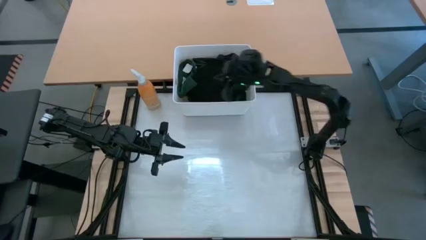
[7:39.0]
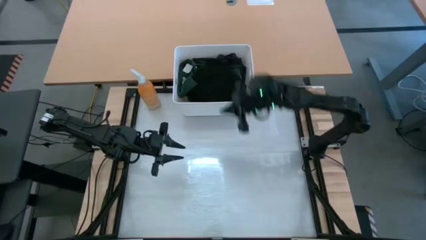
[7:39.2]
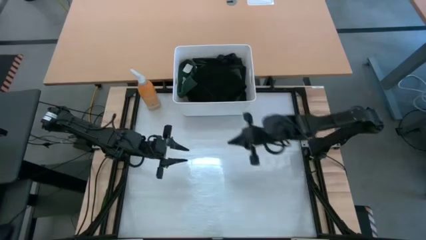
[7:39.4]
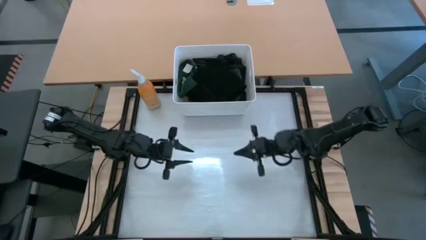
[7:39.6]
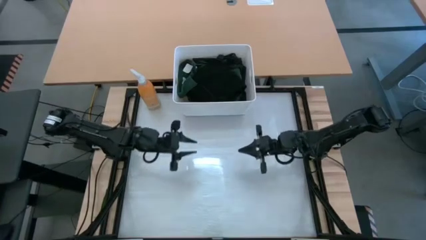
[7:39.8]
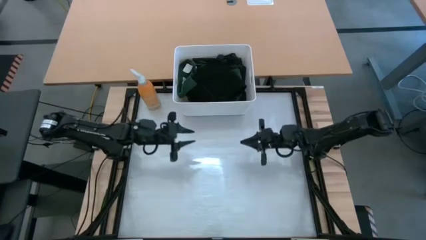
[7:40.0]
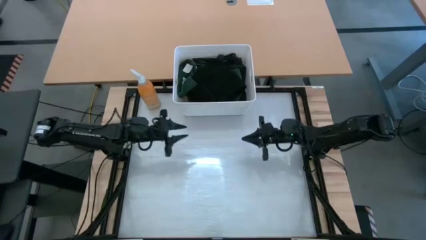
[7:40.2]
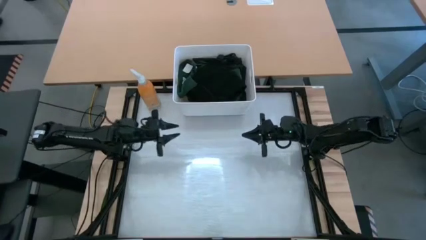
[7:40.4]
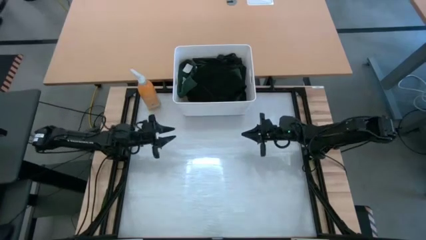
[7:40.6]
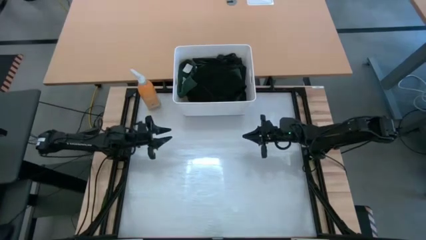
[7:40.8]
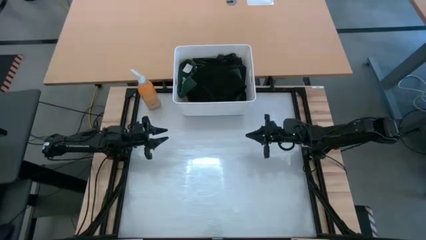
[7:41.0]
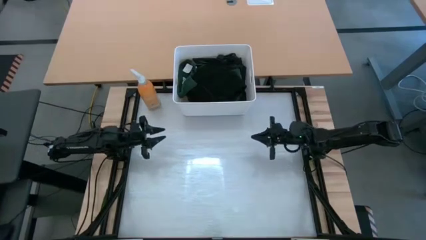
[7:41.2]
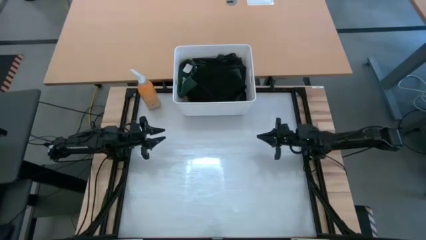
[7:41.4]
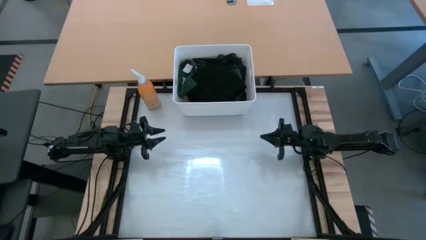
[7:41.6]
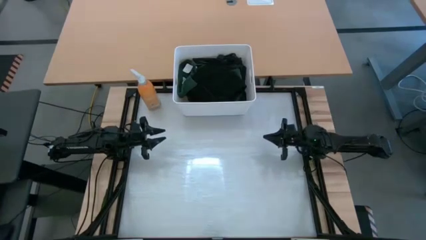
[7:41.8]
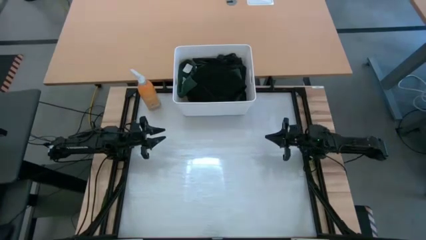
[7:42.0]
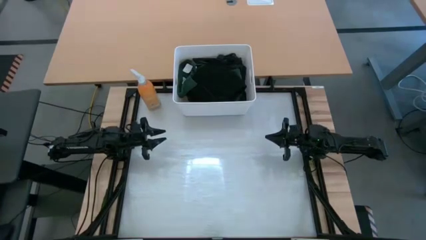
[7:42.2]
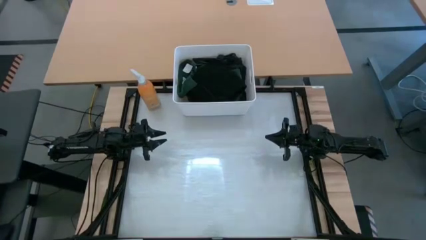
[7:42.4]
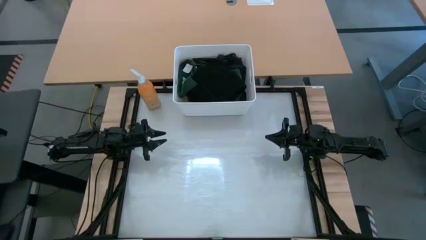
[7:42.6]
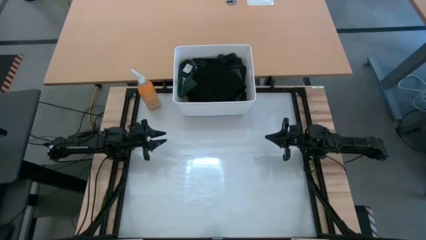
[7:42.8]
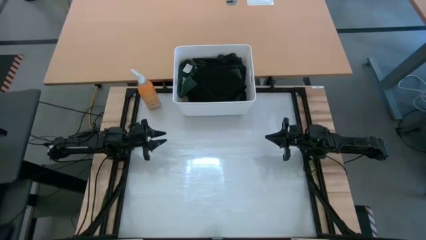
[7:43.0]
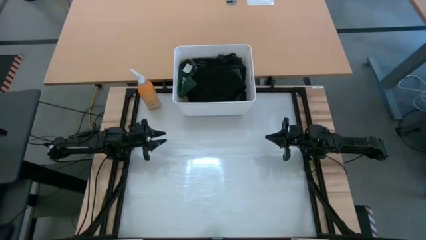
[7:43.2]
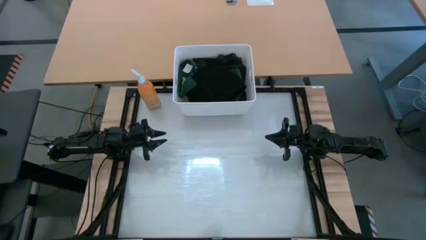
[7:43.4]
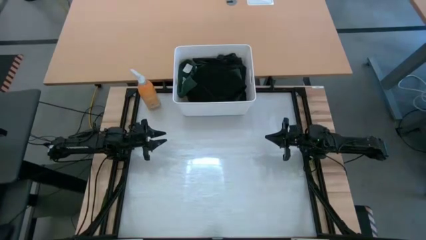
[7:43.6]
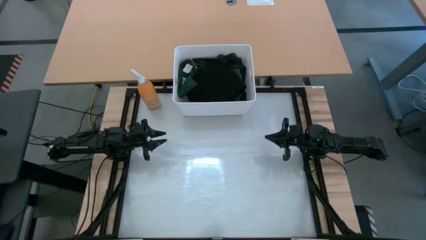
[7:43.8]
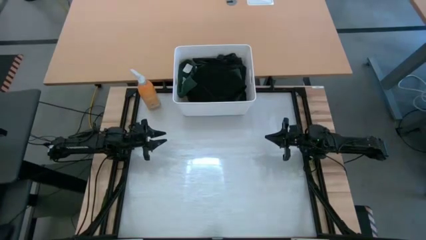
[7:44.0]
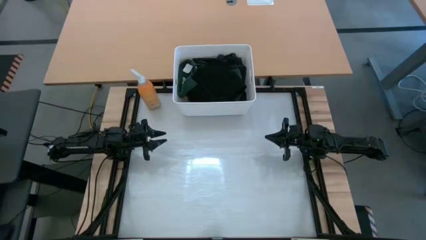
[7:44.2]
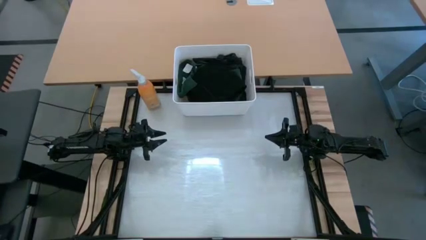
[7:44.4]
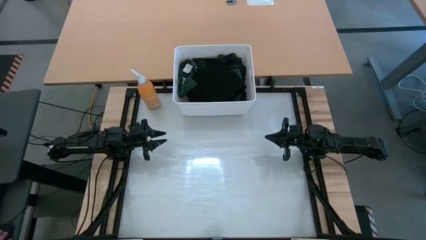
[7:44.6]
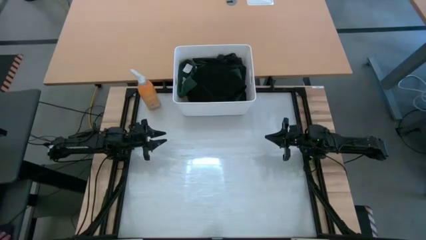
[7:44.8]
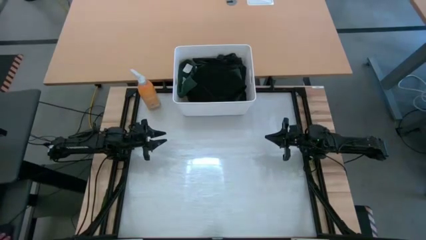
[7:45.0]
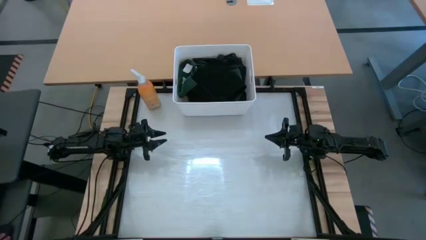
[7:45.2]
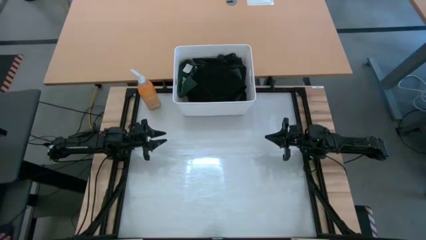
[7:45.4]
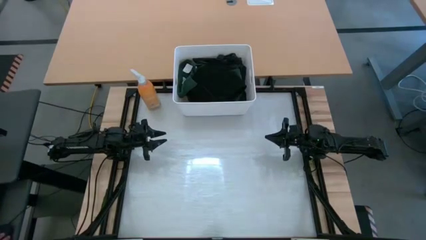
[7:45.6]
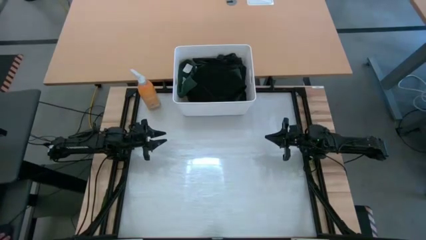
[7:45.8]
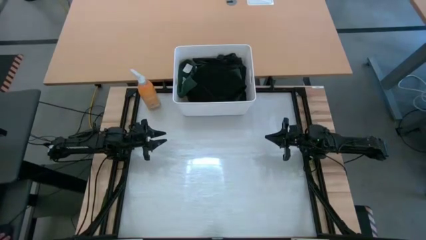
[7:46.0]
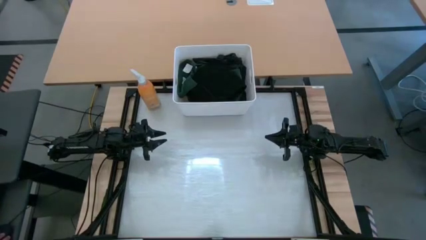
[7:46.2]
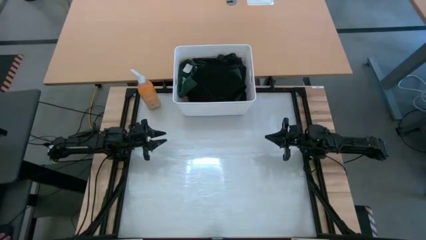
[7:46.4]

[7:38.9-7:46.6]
Task: Fold laundry
Return to Home Position

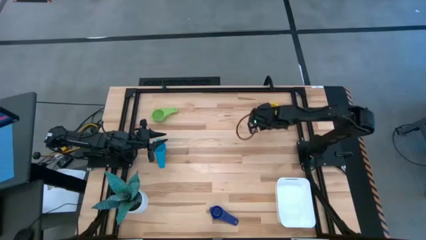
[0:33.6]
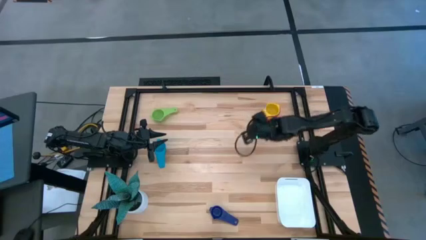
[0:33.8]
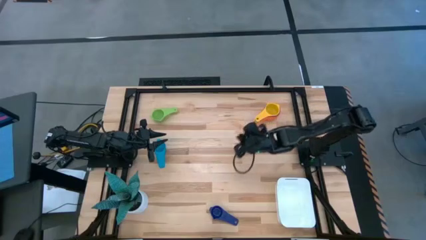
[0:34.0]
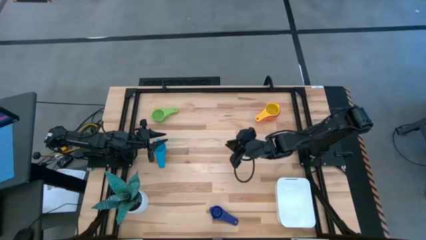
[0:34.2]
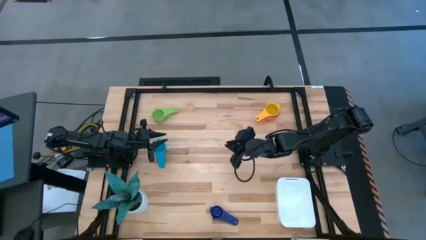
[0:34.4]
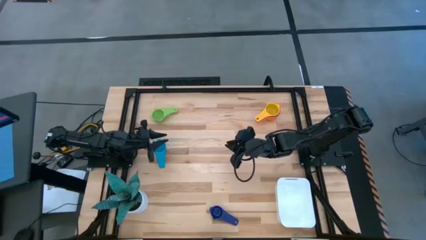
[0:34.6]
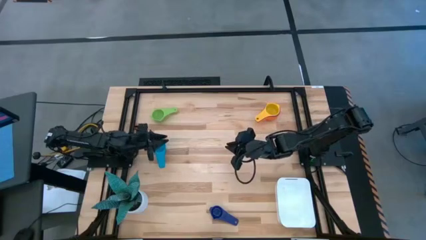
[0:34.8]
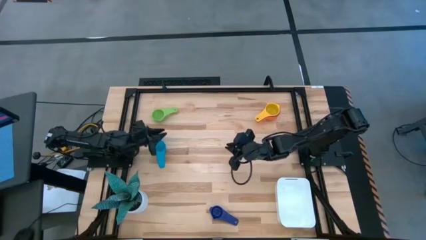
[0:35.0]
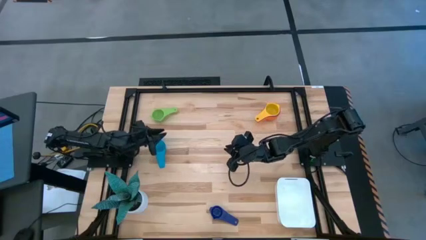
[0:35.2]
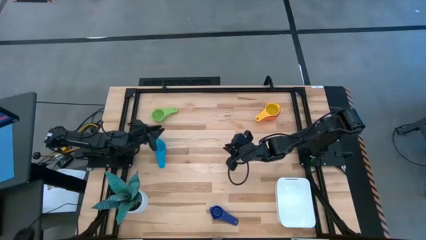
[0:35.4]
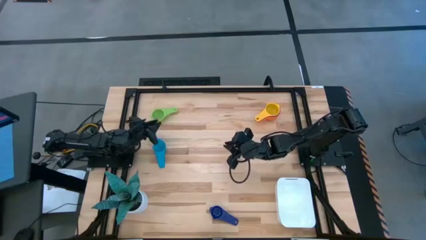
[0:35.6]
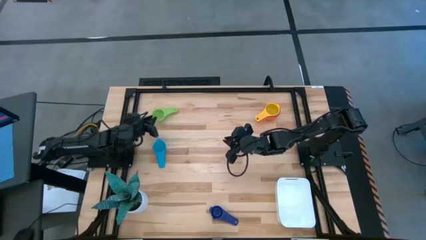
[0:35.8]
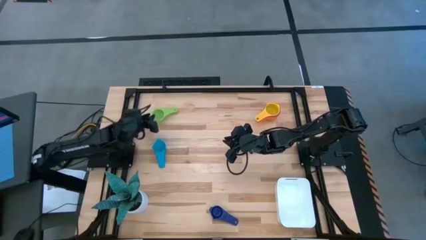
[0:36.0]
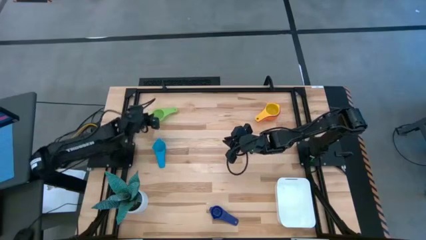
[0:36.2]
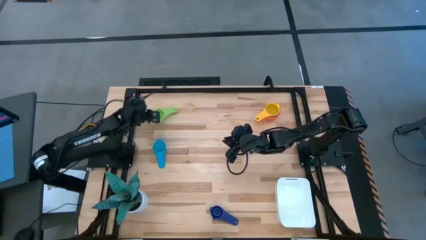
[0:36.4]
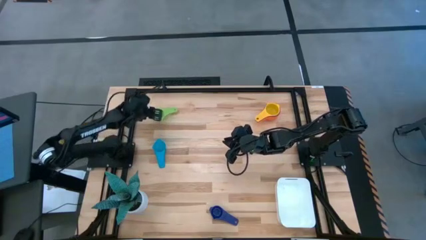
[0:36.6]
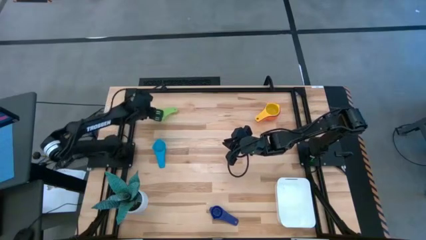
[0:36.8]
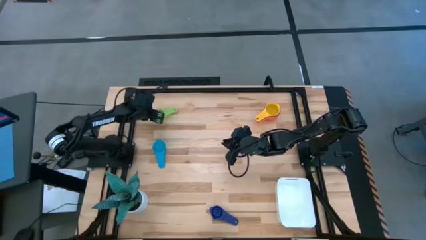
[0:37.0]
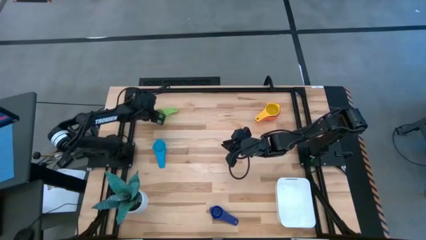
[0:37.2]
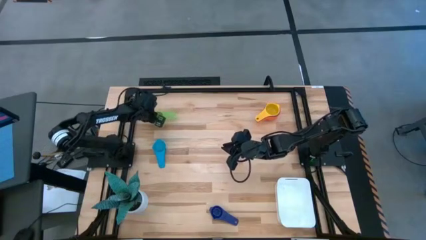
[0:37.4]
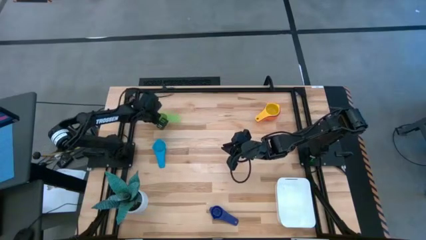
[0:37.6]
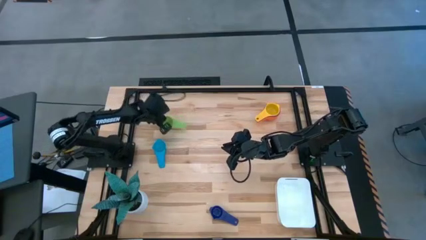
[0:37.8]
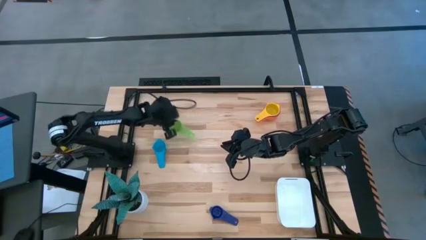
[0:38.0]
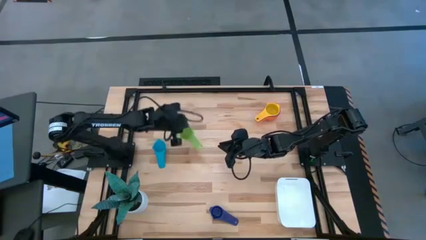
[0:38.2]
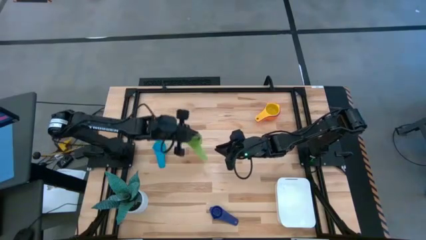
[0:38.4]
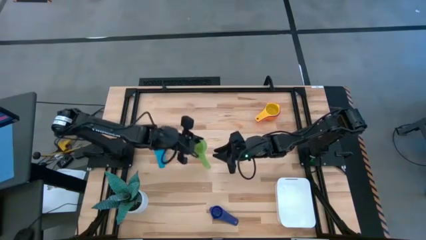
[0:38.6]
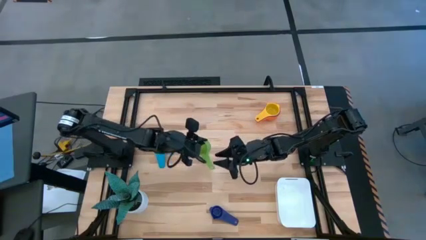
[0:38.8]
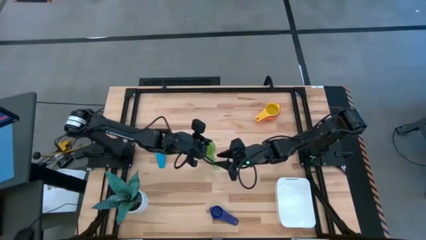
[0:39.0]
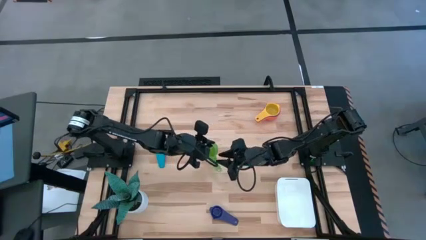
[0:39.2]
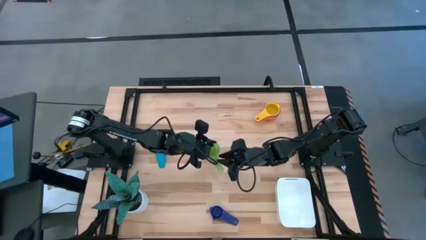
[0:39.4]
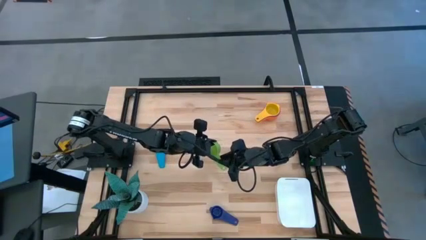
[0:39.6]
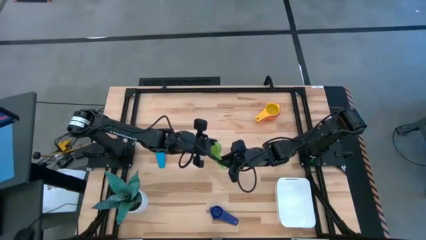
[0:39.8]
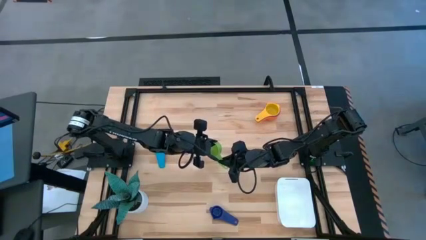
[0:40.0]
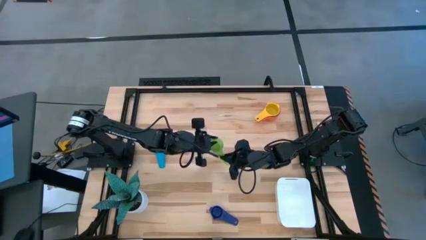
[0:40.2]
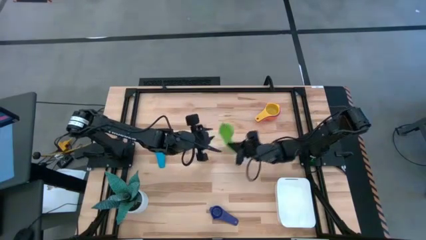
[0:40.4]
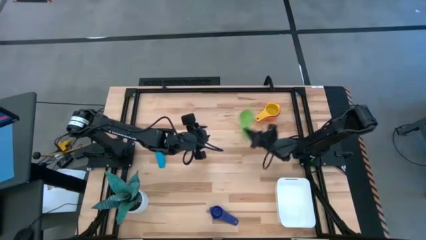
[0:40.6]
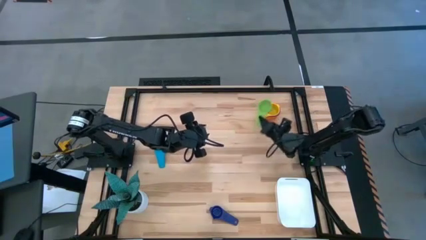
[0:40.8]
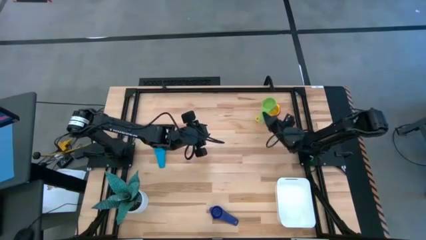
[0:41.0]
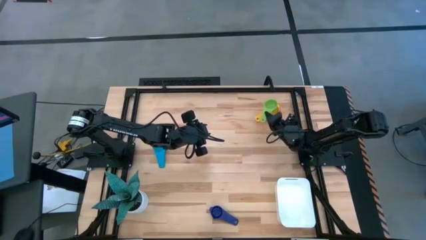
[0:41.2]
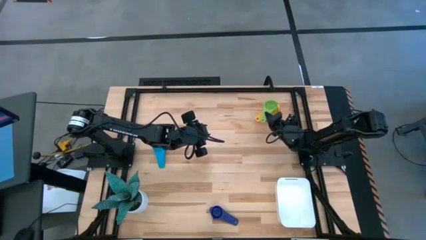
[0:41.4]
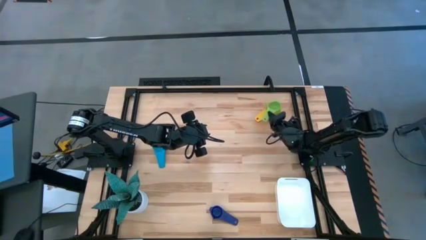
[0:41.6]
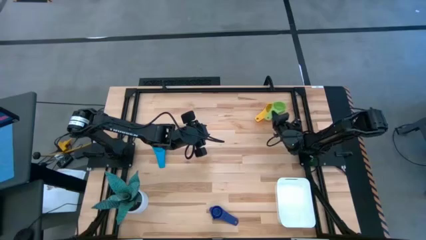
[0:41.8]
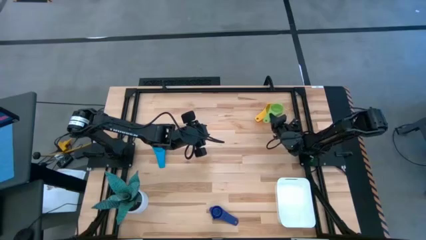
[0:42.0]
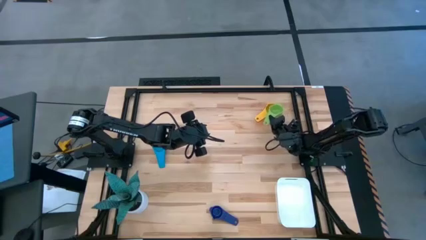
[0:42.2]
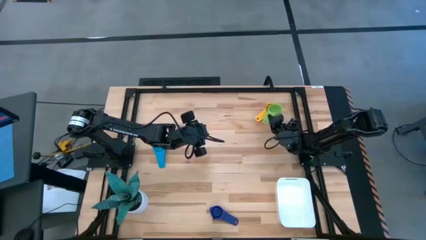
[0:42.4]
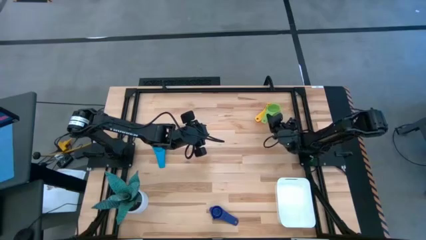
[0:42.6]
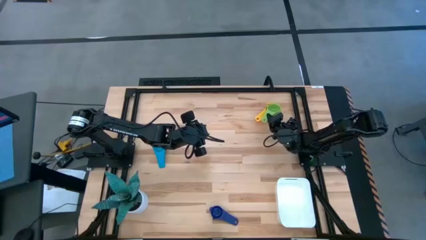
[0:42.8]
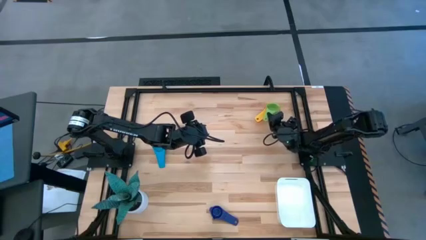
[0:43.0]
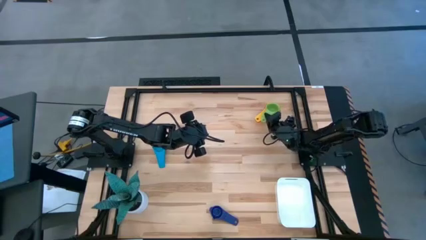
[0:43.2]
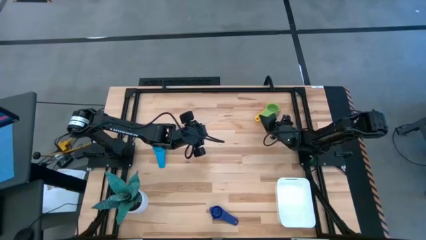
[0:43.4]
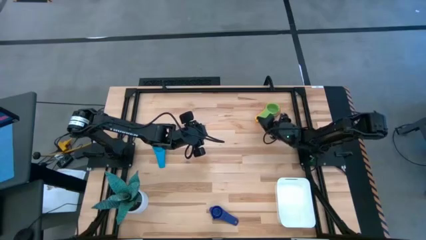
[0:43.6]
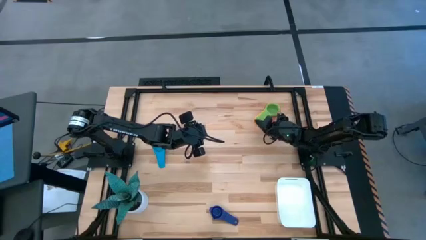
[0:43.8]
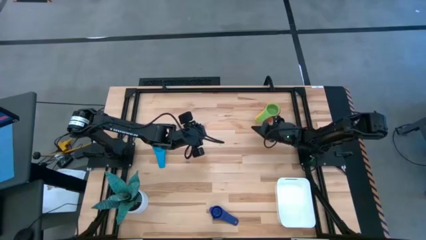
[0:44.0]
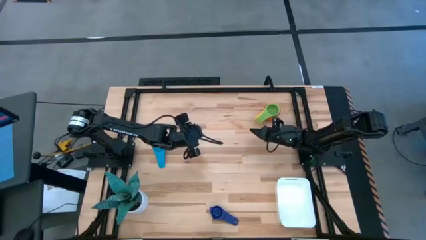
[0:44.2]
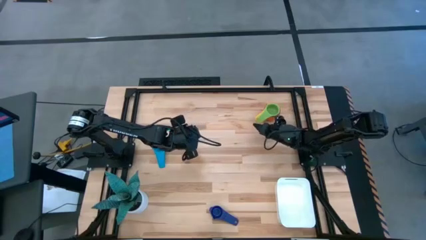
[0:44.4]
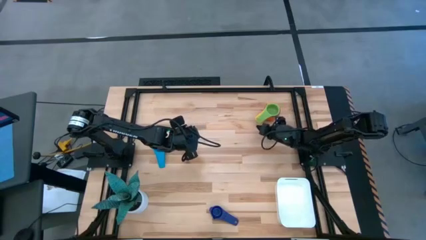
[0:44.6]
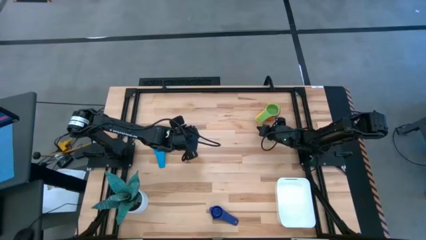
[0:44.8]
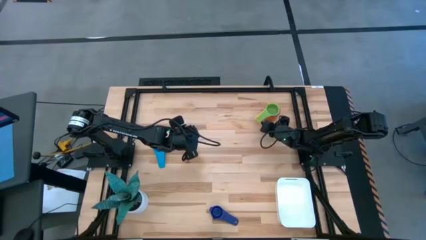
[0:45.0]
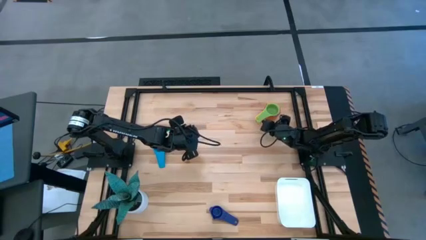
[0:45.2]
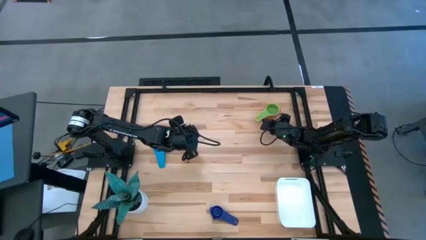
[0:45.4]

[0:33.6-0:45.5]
Task: Nest measuring cups in basket
Stack the green measuring cup on the yellow measuring cup
